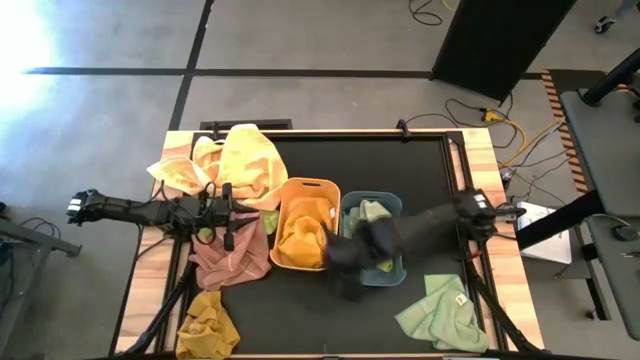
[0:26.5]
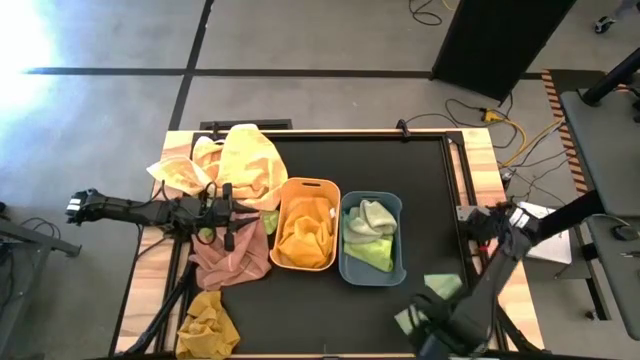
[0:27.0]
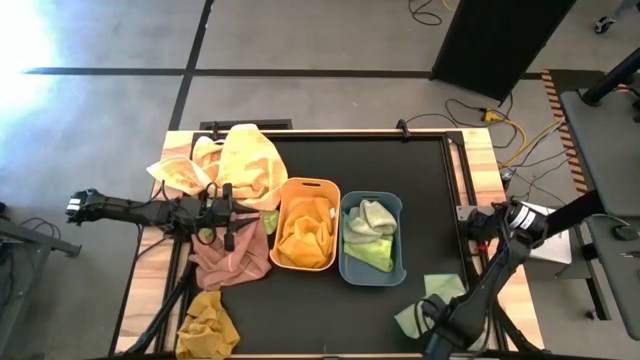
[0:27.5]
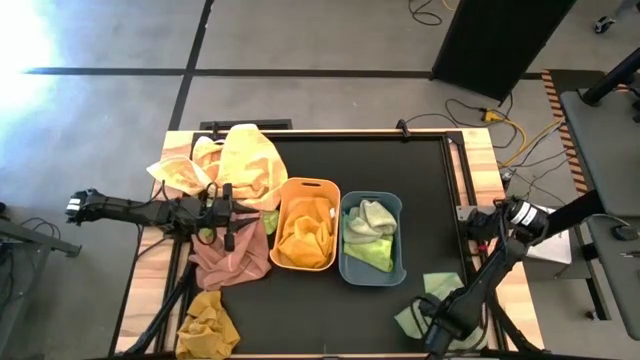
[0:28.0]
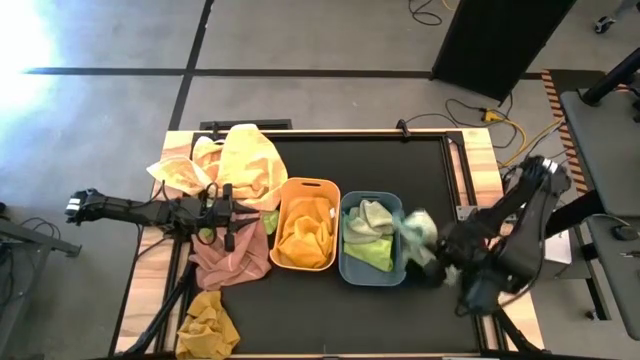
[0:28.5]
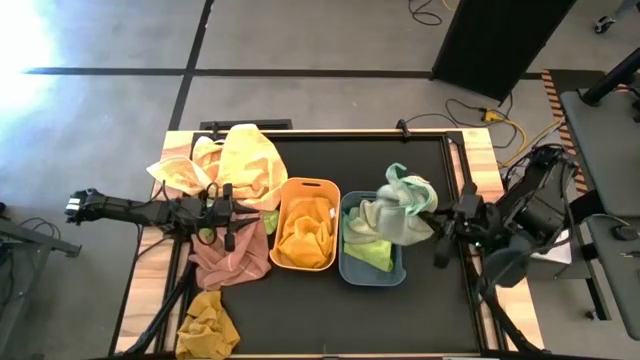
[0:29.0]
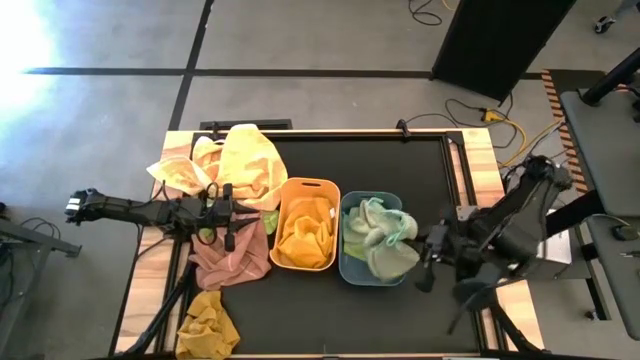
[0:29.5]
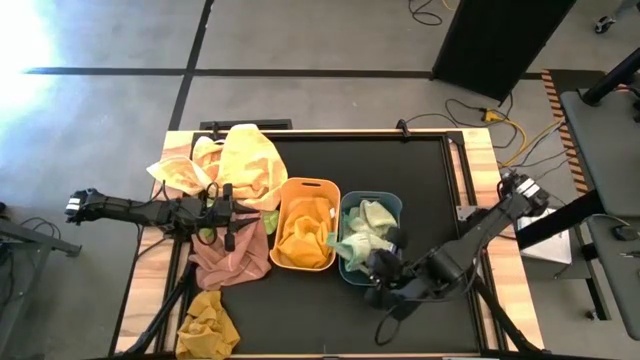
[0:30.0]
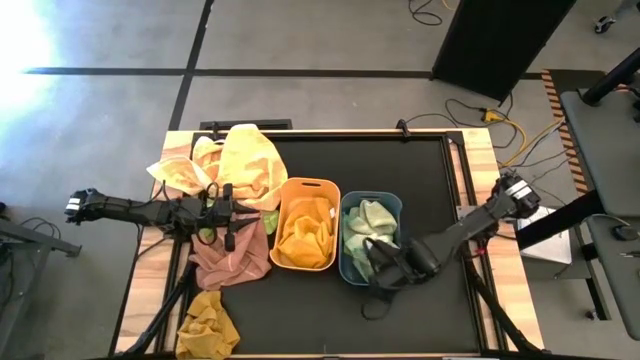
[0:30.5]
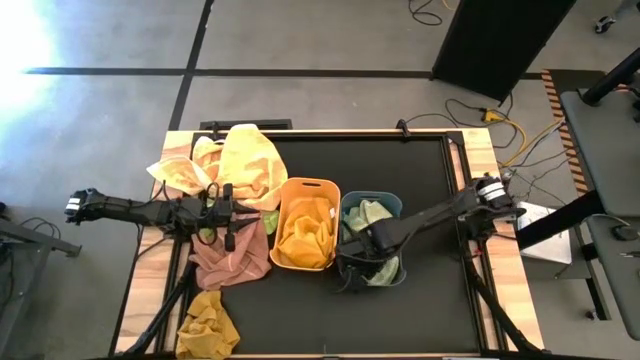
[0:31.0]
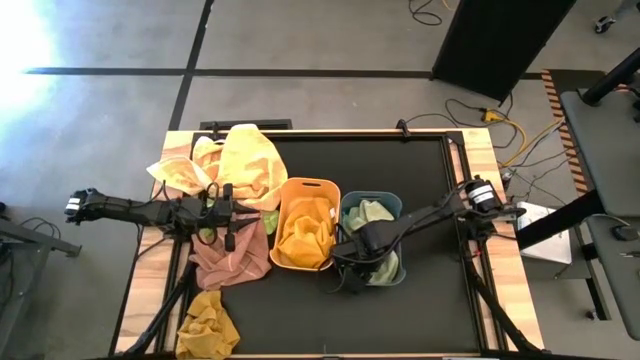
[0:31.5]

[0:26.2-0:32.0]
Task: Sort towels by color in basket
Put the white towel into the blue bin

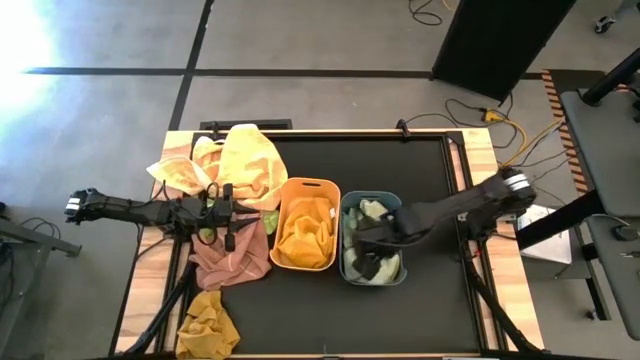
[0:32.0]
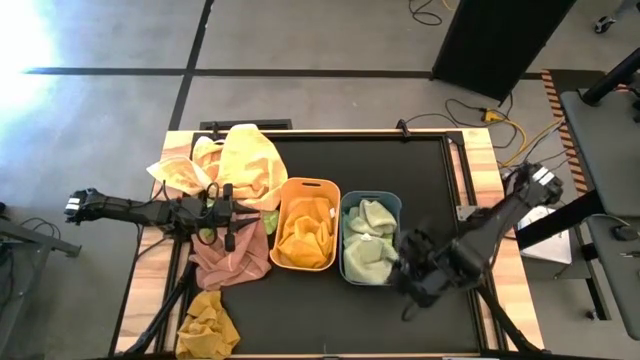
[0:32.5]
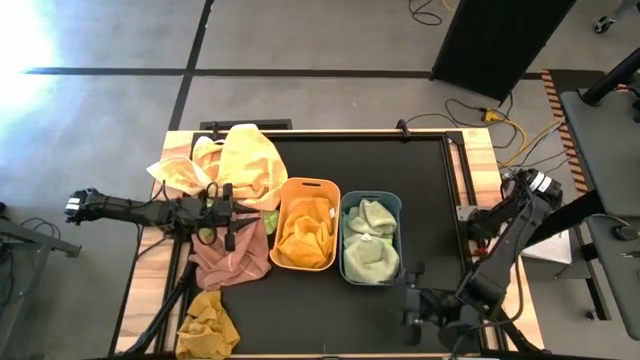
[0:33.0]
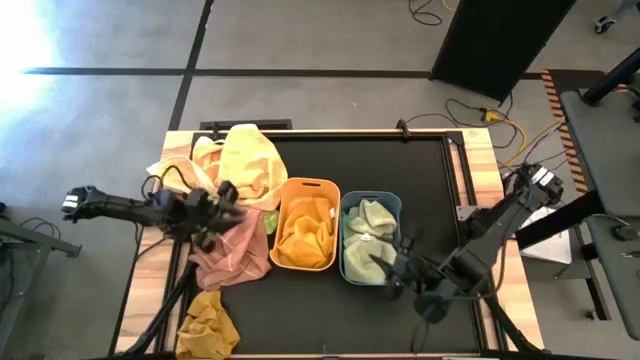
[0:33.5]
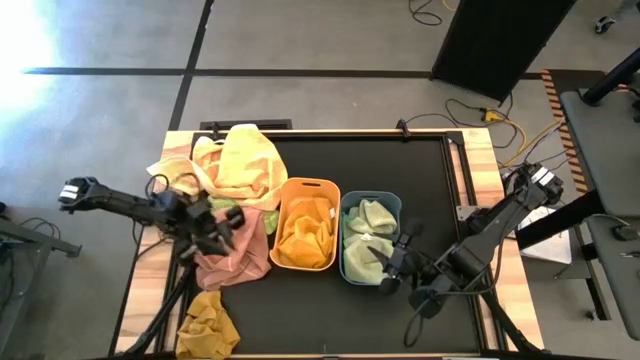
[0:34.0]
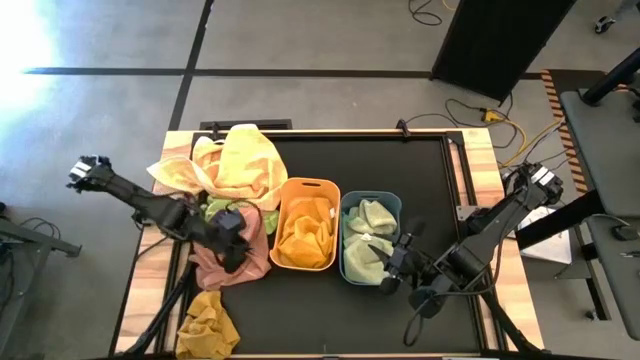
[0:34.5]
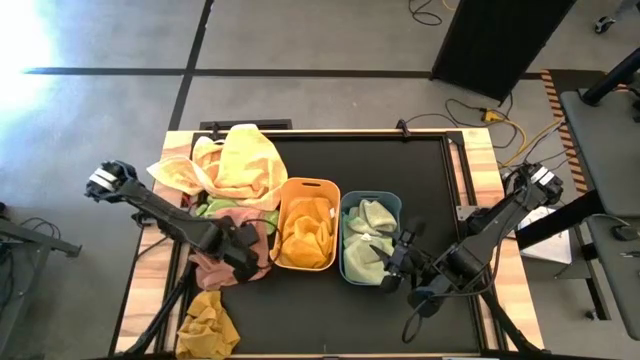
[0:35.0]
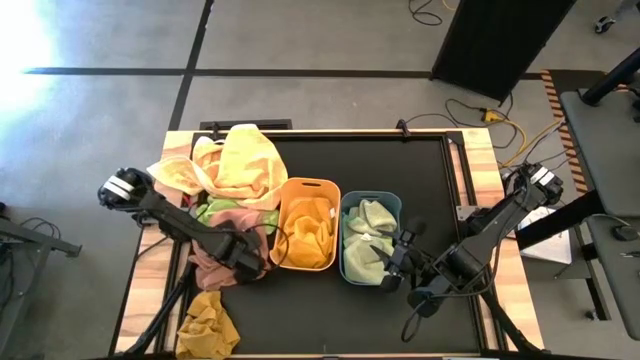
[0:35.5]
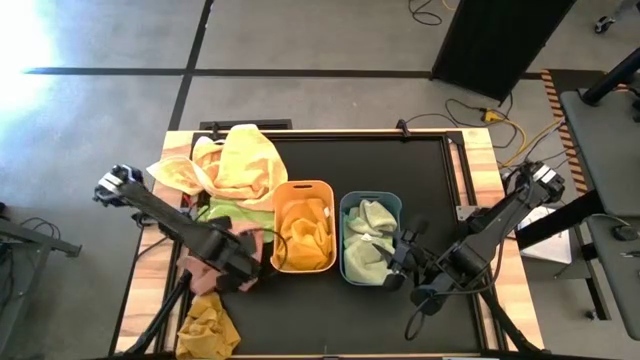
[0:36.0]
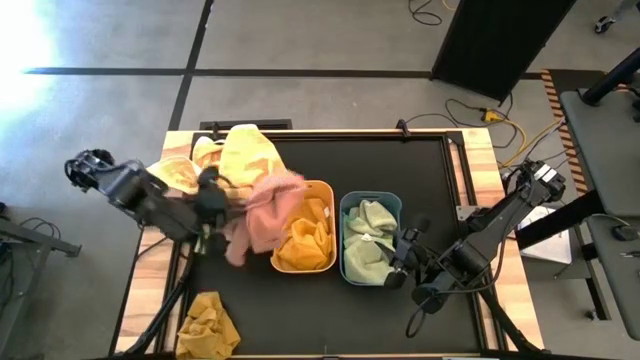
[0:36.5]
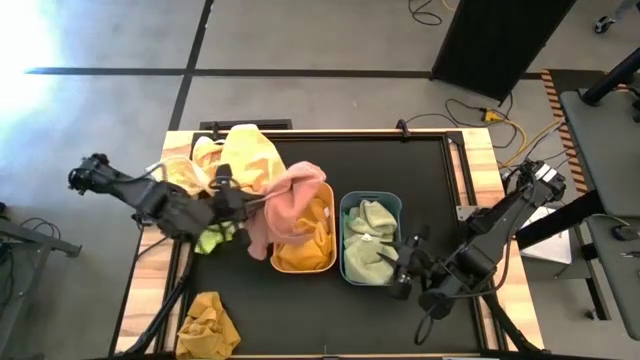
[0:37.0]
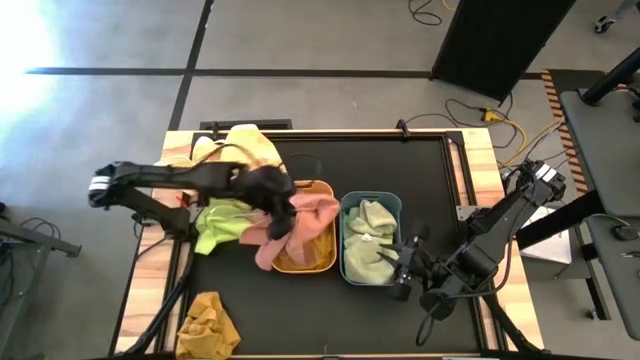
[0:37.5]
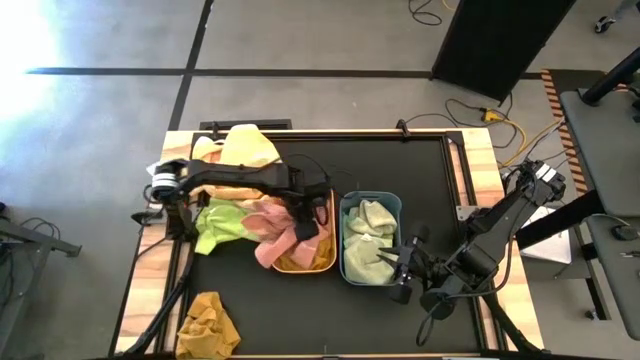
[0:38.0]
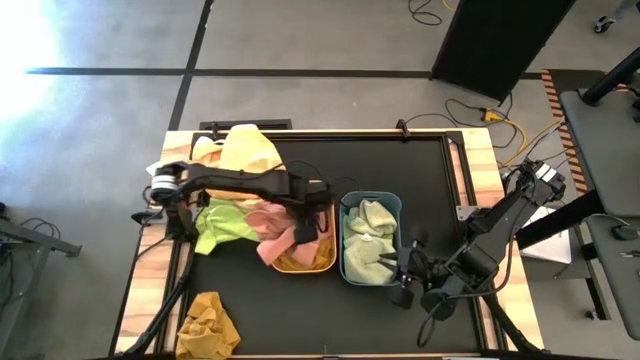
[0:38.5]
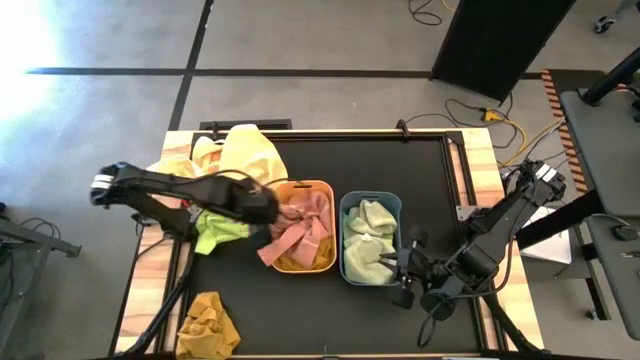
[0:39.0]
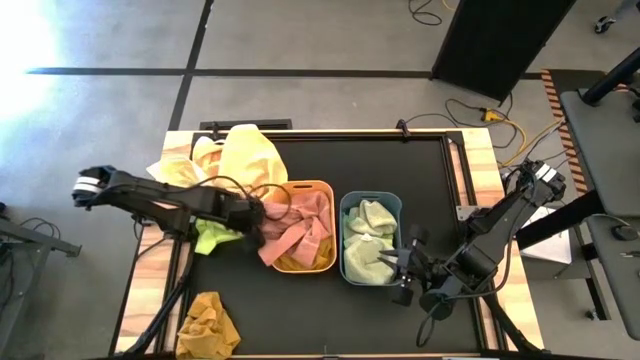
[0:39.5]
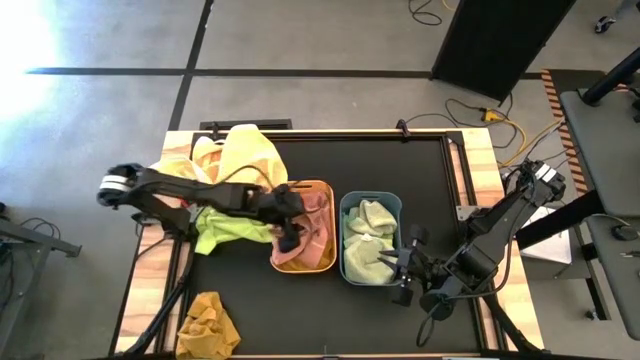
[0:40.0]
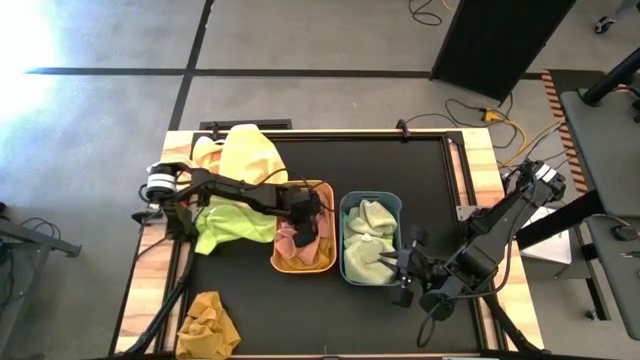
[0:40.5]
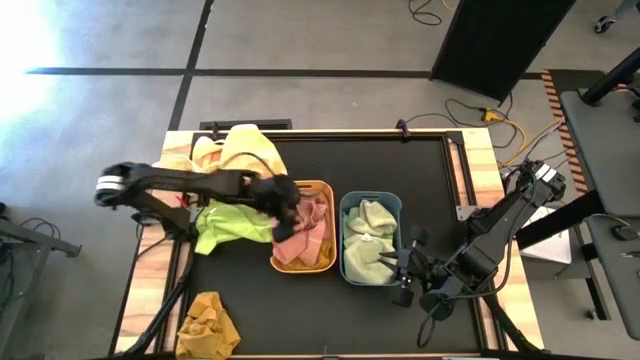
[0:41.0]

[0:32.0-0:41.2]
Put the light orange towel into the orange bin

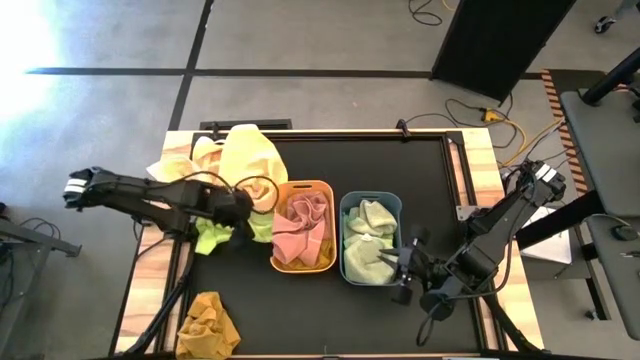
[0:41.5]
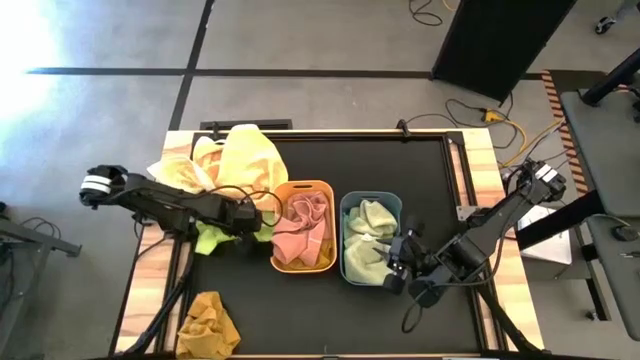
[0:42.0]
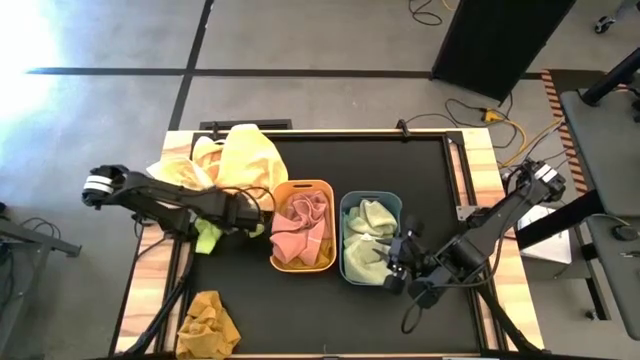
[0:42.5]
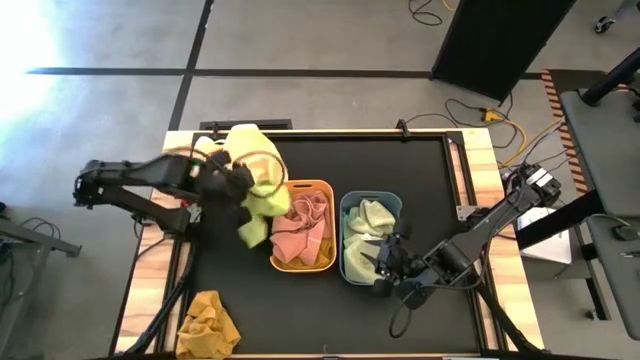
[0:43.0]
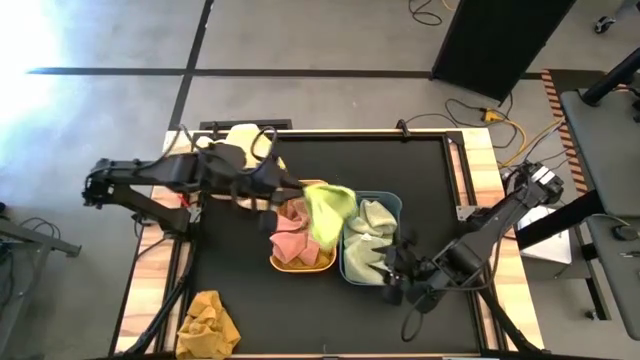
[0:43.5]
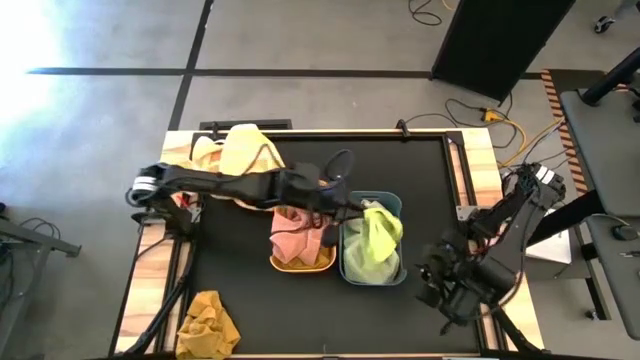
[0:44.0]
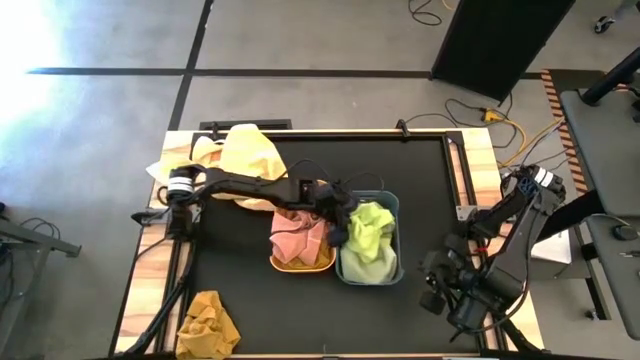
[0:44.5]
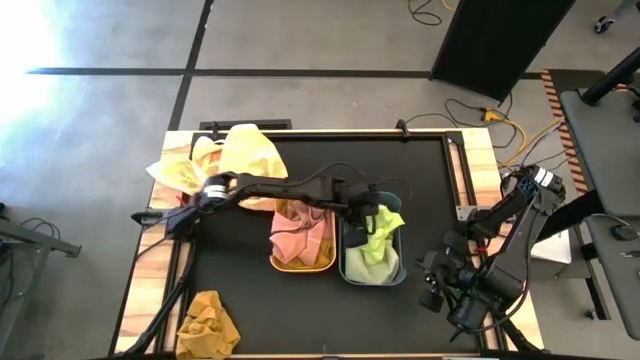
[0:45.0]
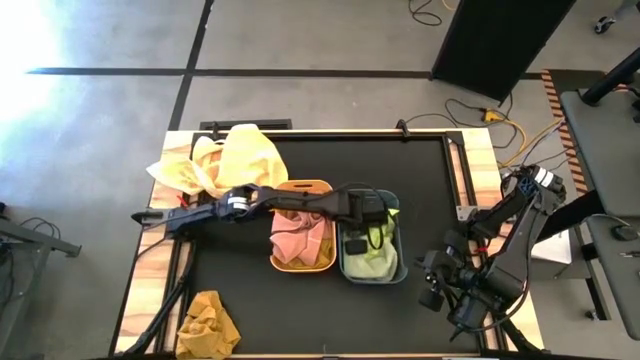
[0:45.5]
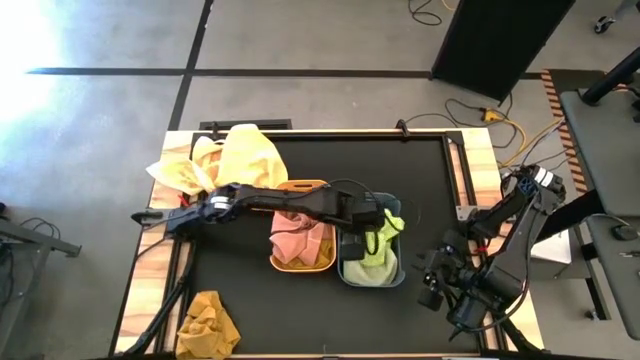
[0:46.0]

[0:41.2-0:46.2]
Put the light green towel into the blue bin
